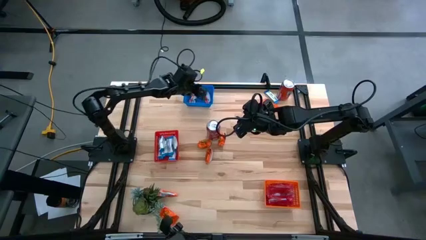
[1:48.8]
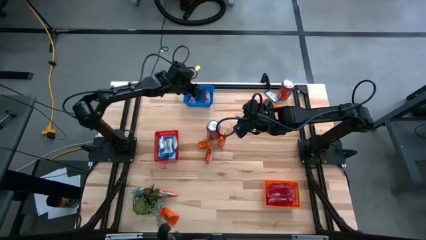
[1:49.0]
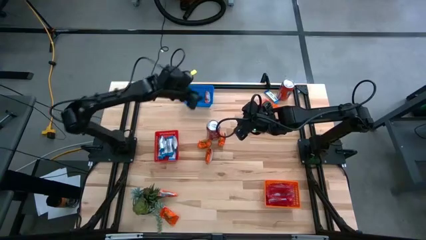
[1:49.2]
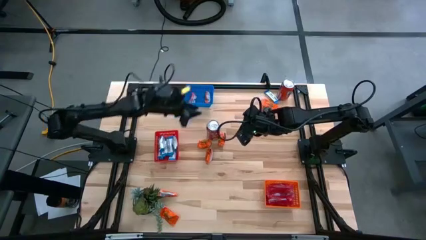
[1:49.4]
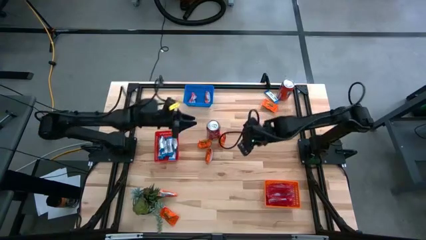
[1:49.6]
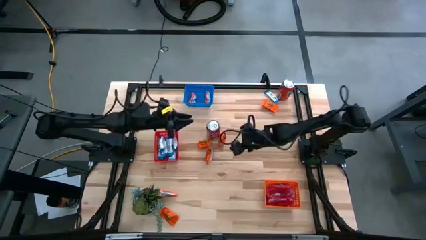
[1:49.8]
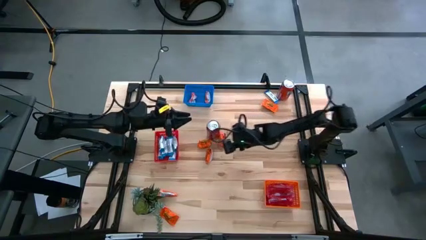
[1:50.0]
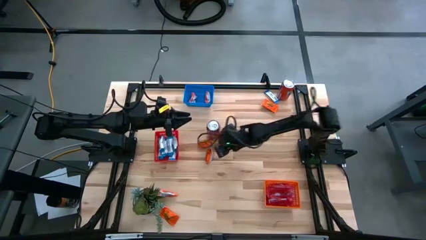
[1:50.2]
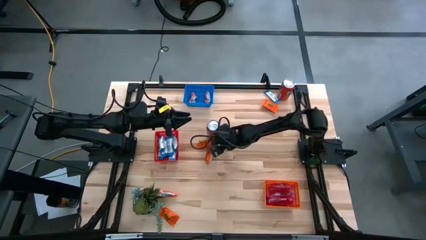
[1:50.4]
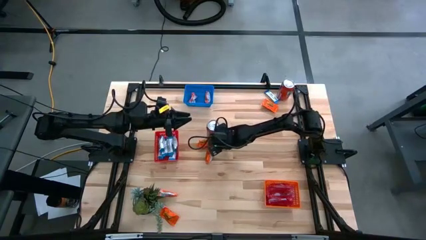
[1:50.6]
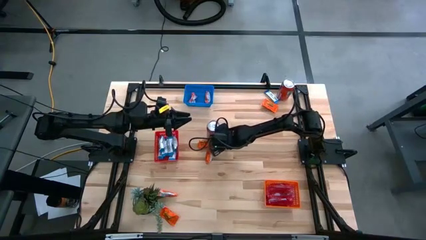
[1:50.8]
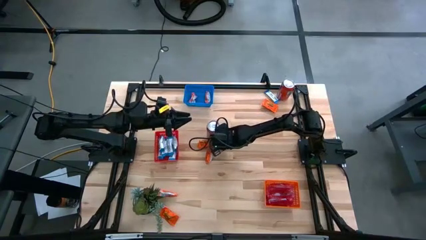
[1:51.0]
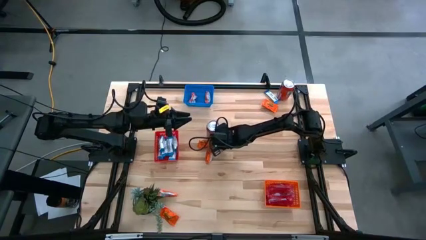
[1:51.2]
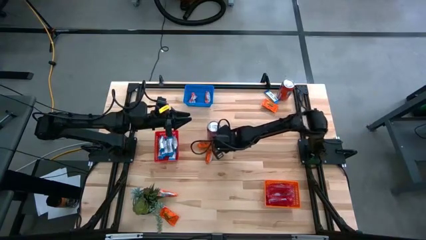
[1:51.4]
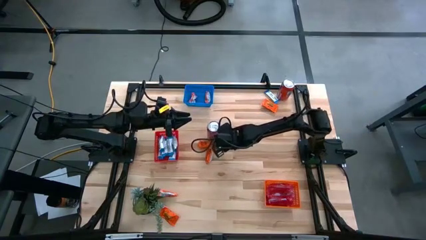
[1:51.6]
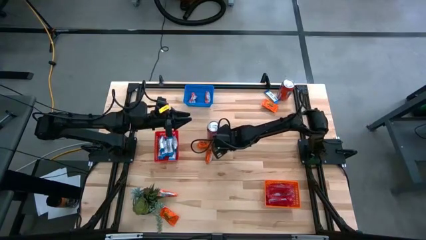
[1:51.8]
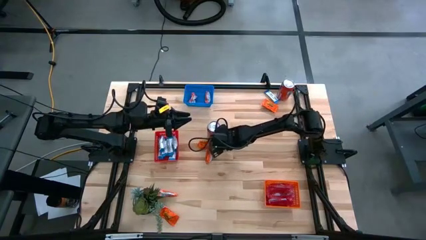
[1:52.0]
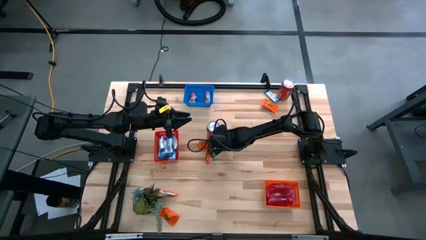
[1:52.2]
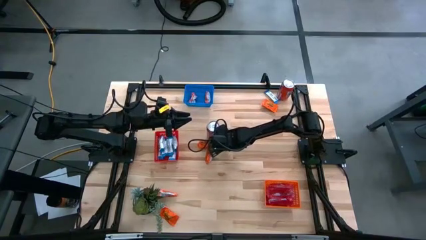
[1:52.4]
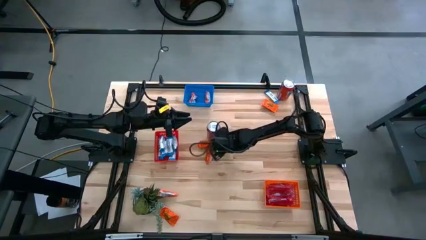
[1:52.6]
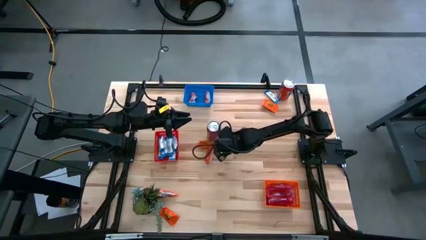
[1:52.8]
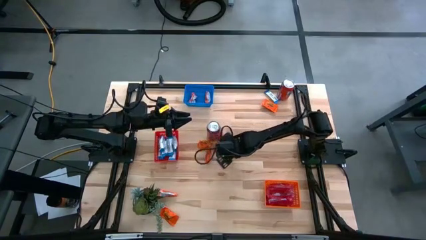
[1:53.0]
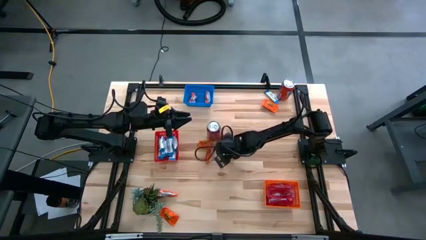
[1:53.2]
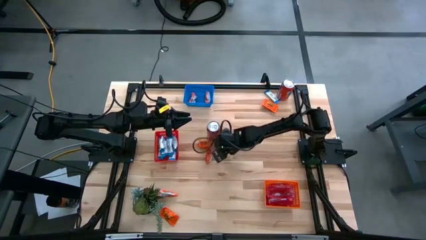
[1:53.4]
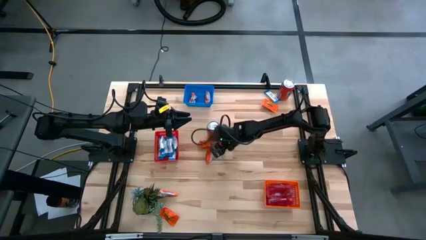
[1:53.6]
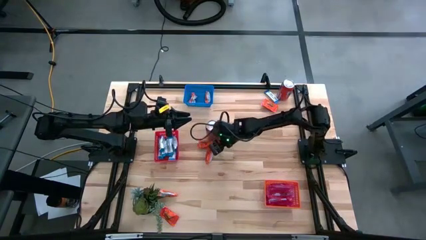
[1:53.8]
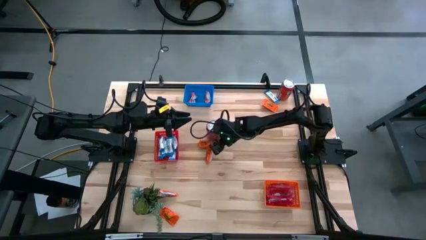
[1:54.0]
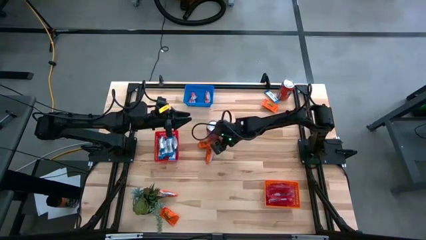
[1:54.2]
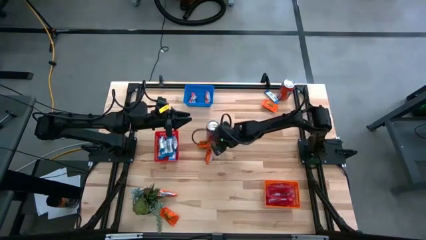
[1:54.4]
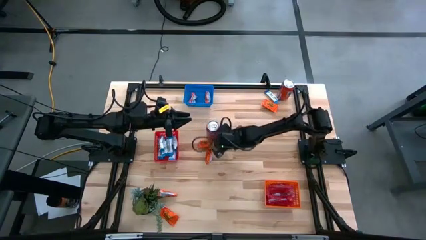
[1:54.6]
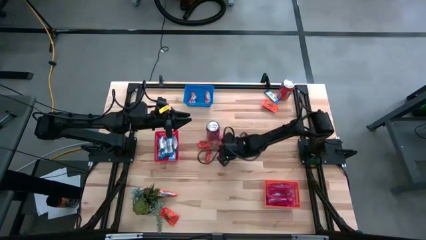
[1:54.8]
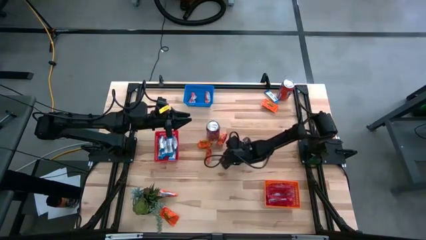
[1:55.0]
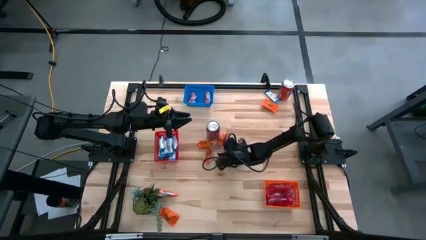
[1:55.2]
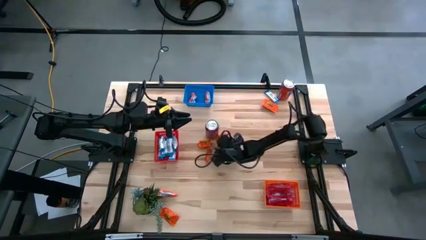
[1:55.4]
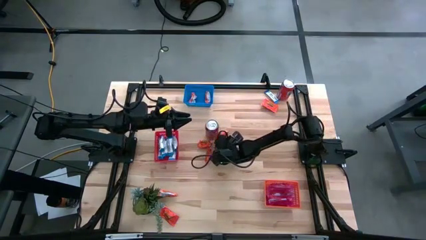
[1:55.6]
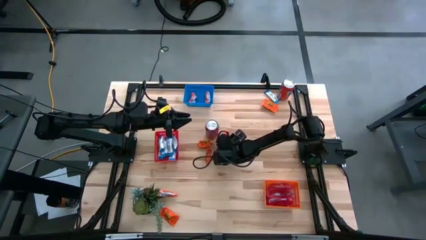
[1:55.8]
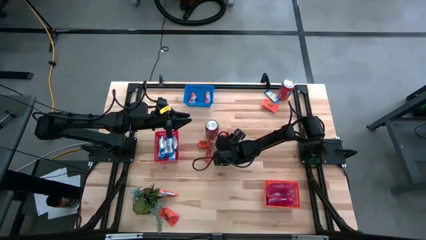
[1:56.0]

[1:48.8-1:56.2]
Task: Sort candy
Put the orange chocolate into the blue bin

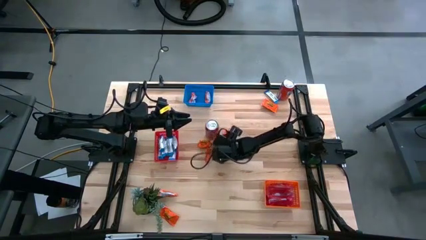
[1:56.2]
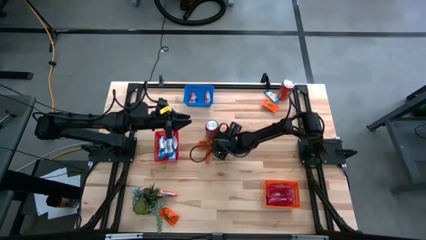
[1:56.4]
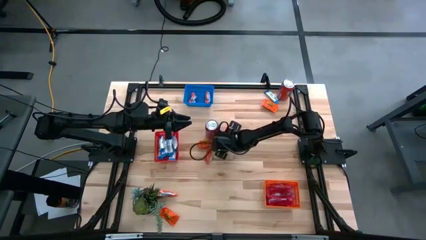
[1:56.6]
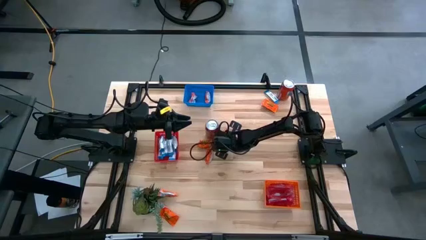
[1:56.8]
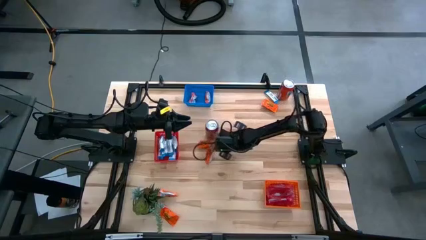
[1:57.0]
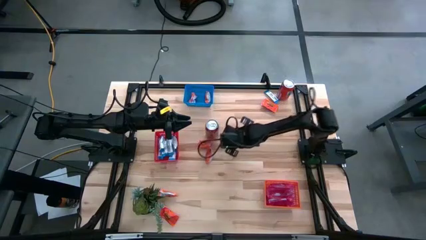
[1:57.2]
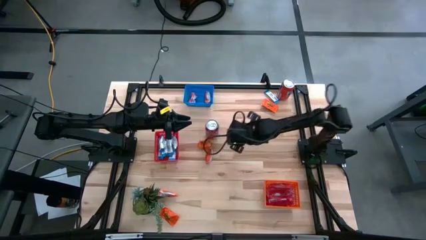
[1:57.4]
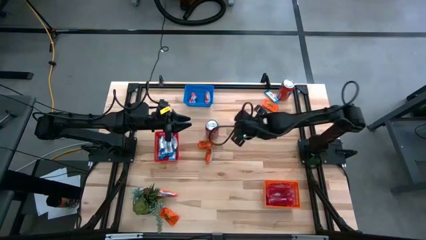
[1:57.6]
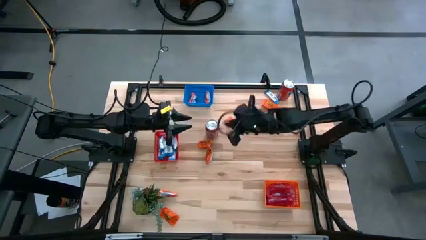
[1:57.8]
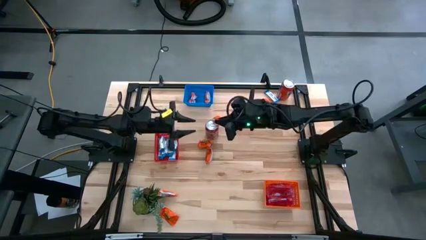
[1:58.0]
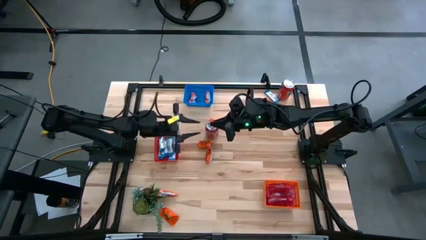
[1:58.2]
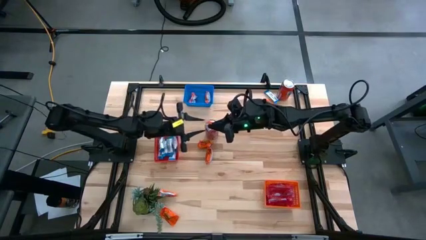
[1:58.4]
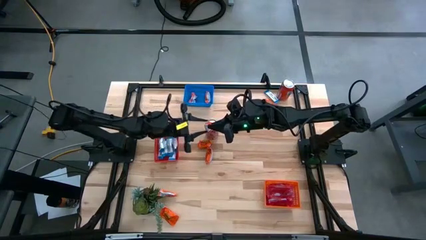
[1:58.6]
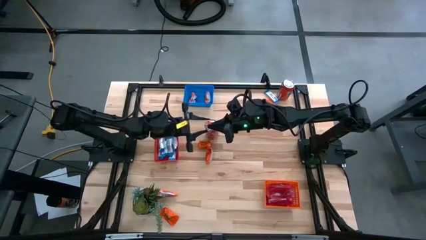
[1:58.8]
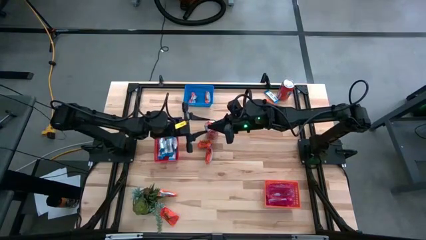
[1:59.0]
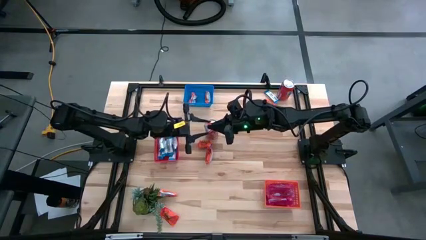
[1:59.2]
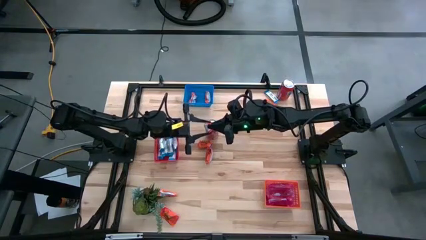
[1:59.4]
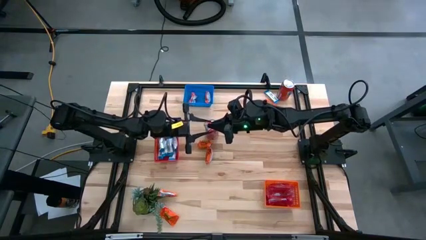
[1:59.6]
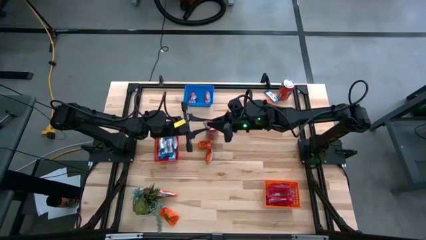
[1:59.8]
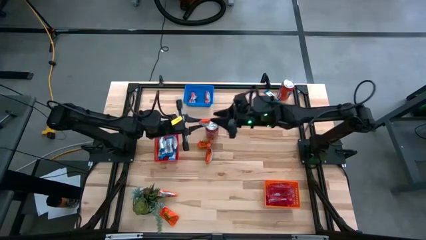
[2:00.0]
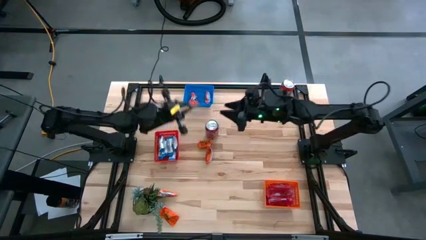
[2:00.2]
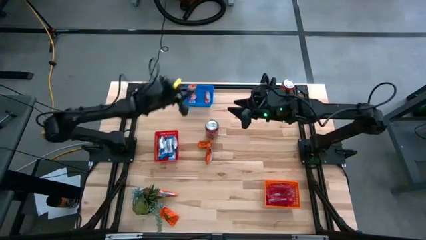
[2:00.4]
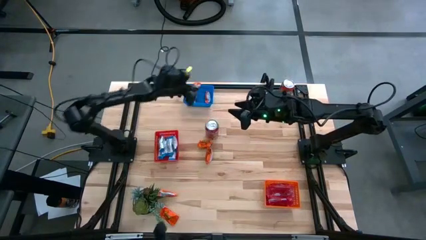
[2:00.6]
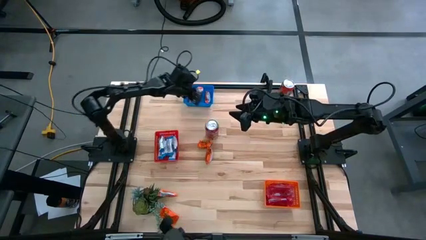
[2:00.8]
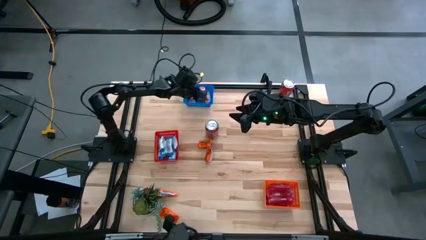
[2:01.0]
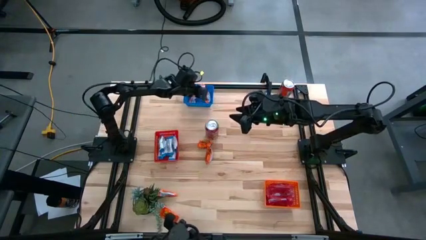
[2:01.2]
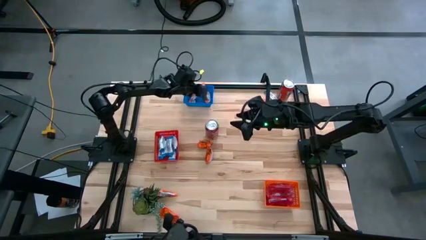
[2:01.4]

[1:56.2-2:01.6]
Put the orange chocolate into the blue bin

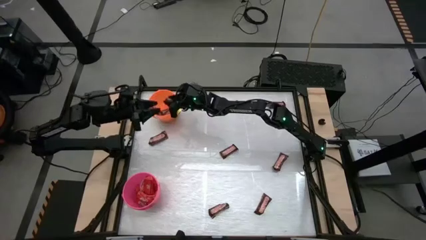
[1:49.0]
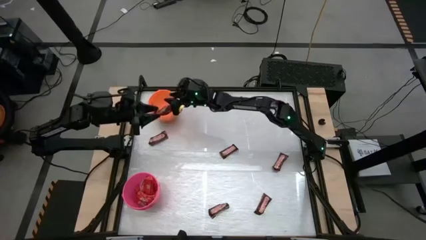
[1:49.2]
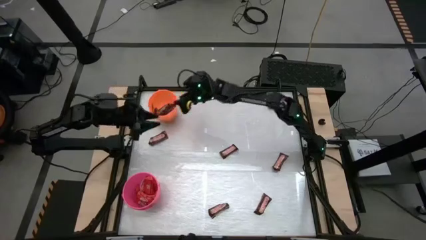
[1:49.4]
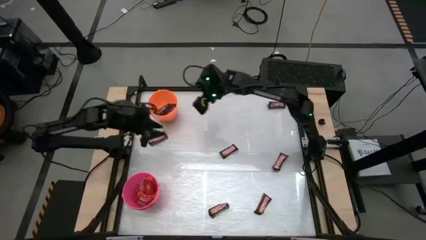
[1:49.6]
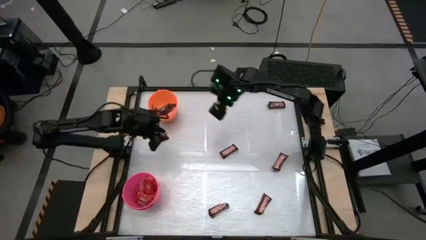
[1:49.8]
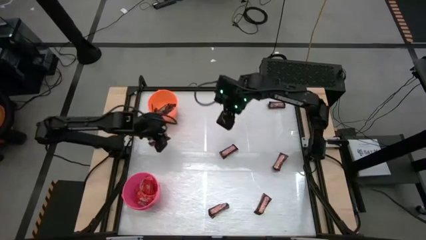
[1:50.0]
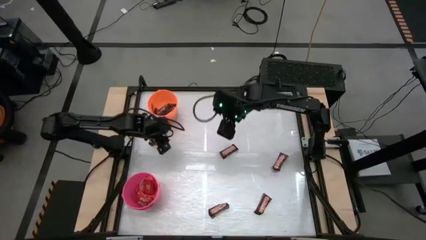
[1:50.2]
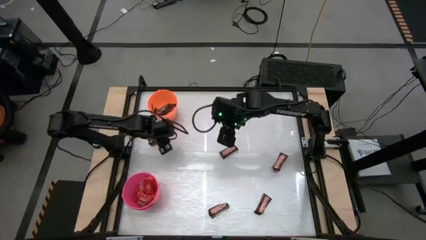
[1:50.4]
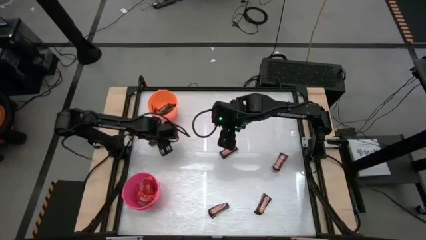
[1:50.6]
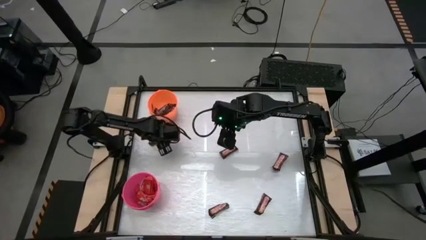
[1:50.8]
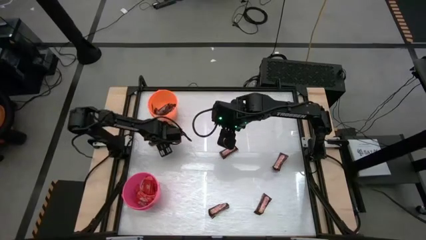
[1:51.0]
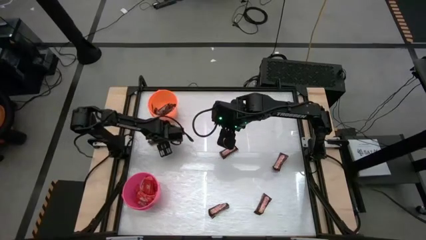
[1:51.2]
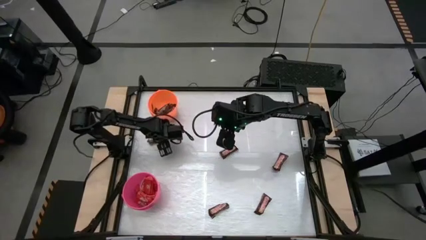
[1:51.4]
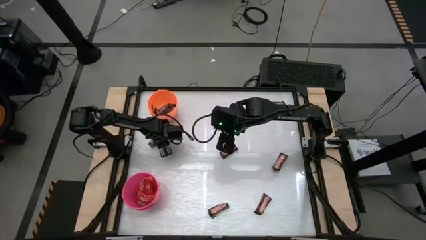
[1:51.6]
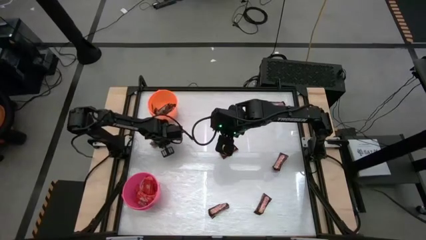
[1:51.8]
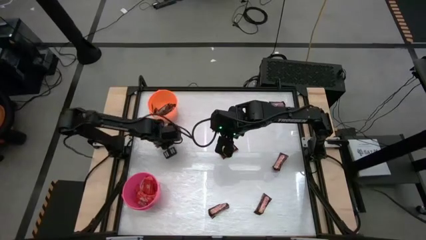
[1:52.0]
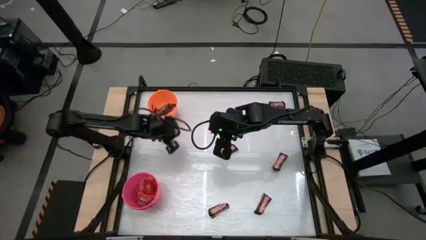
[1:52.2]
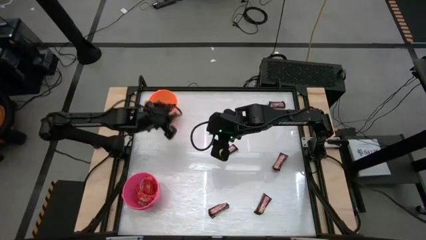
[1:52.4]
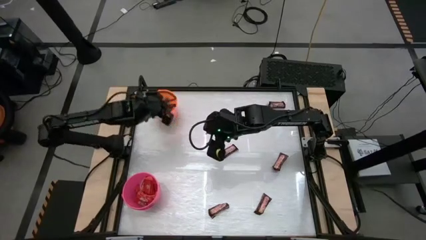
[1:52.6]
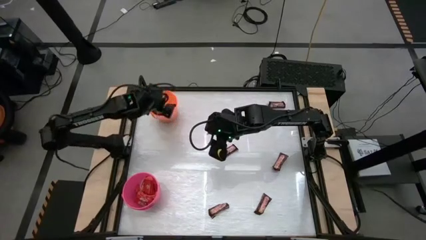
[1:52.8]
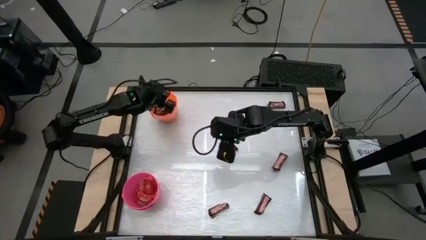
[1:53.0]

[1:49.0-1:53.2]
Task: Sort candy by brand, put in halloween buckets
Put the brown chocolate bar into the orange bucket
